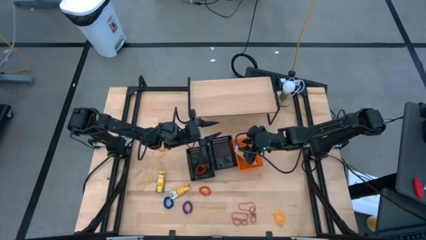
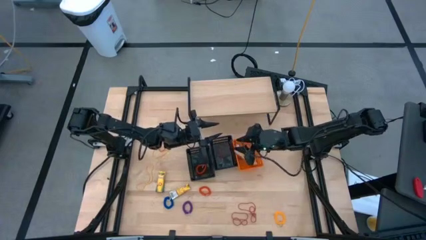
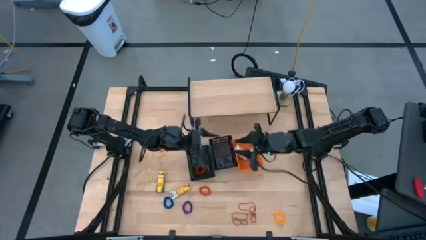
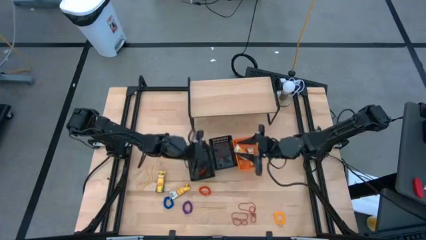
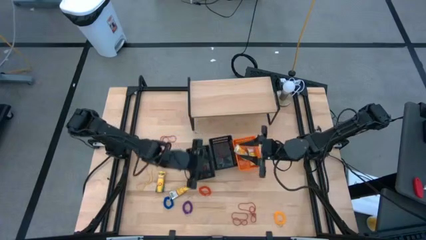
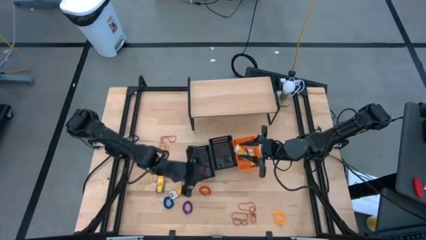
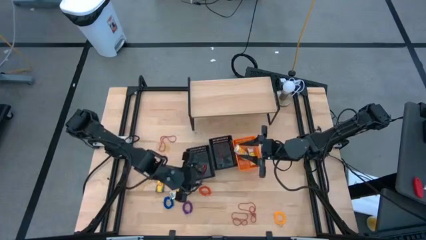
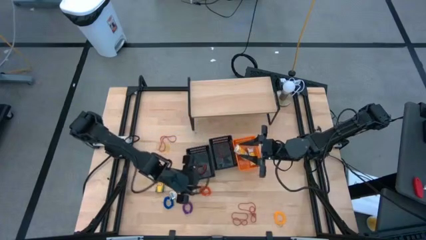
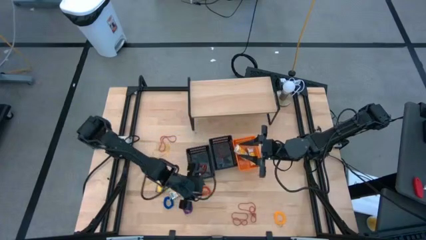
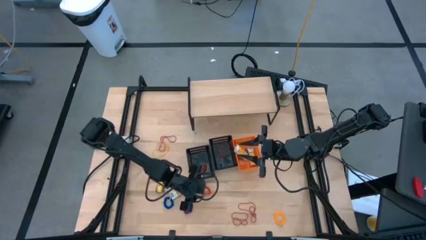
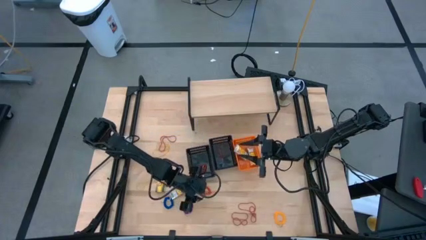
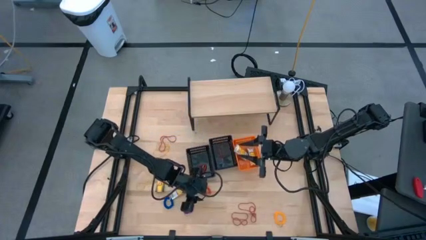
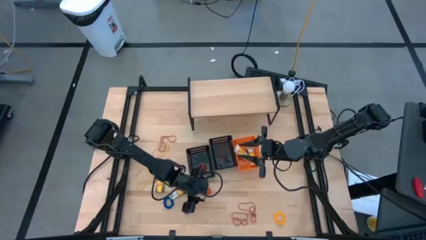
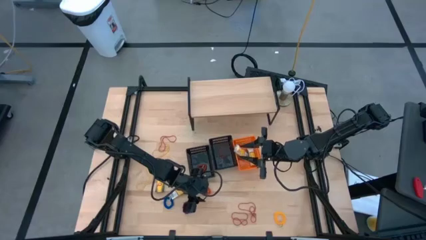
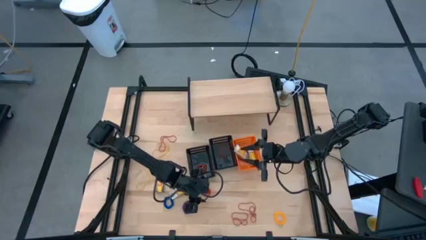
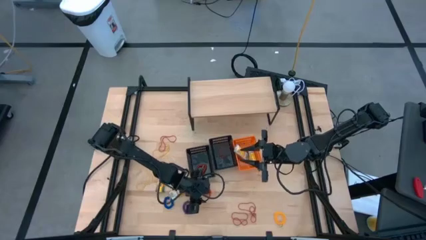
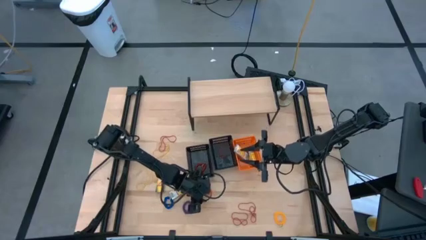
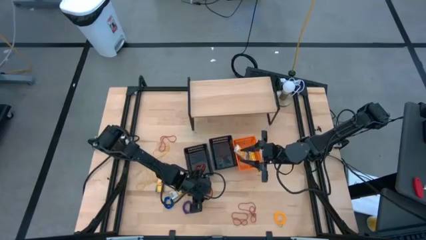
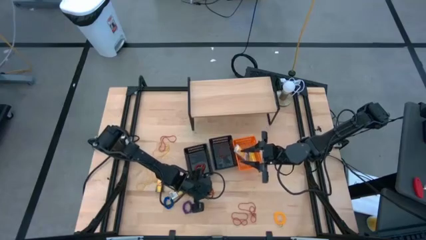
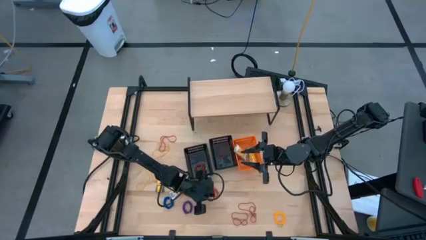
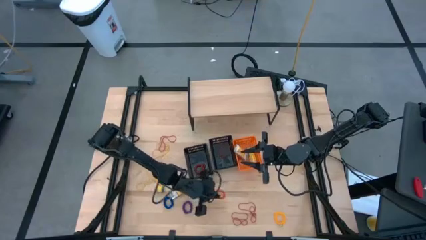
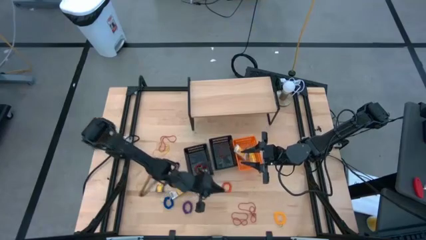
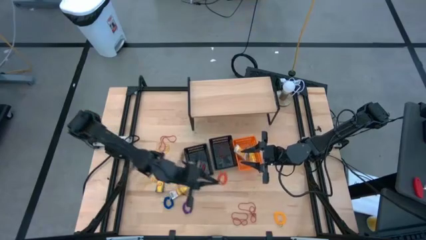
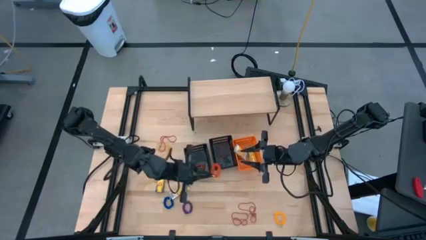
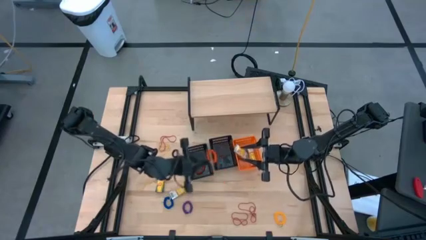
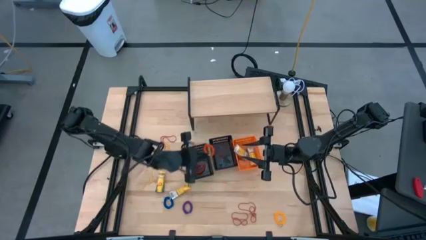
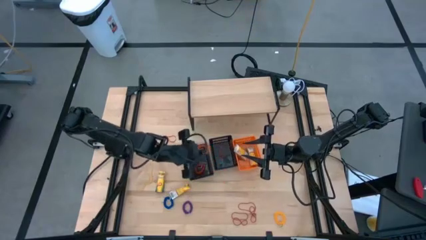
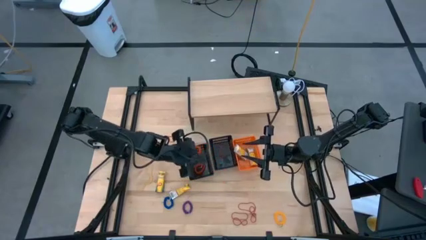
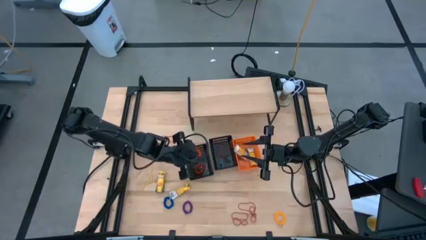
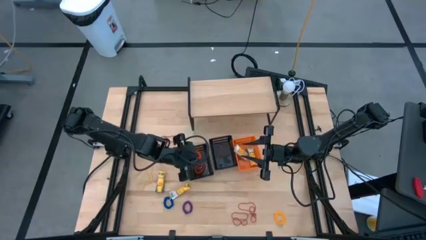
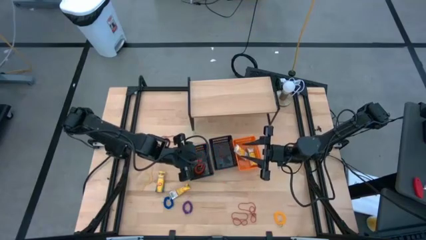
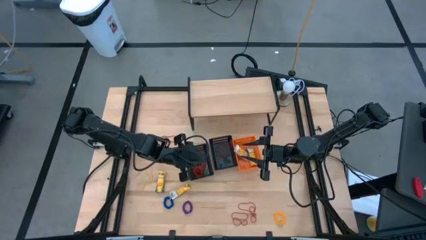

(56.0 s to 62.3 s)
Task: Pick & Place Office Desk Supplies
Put the orange spiral keychain into the left black bin

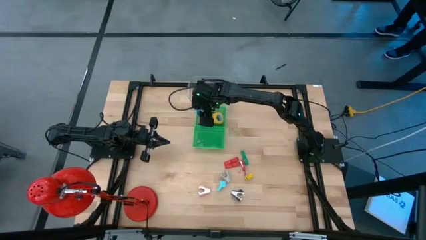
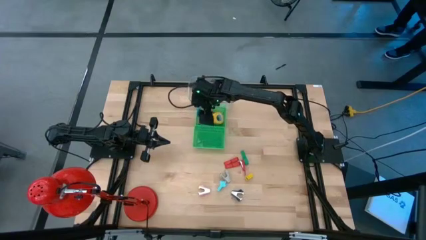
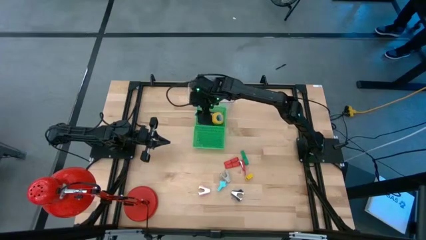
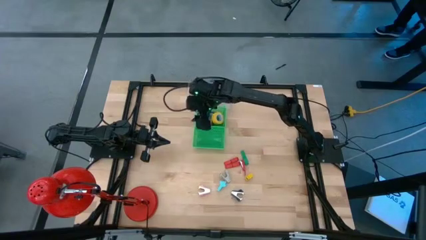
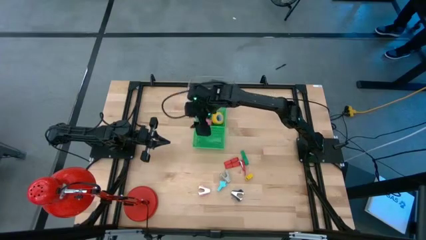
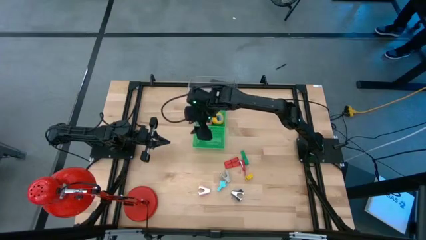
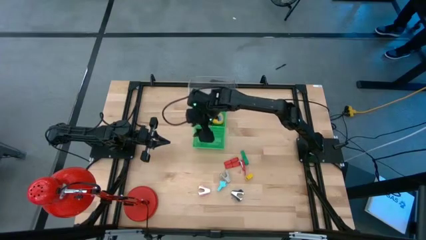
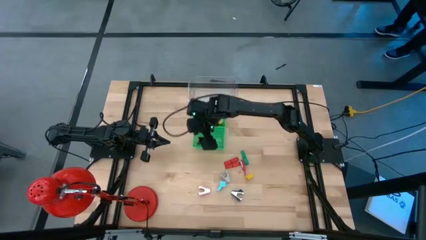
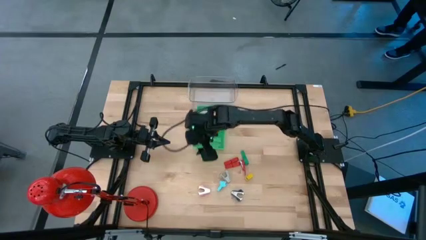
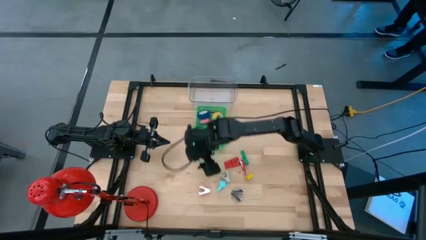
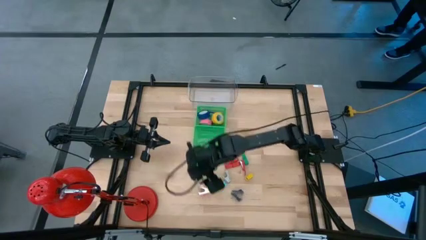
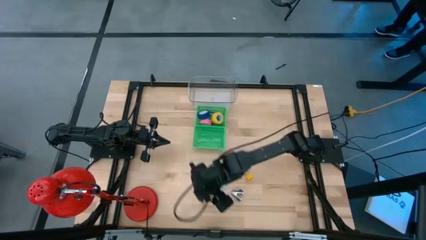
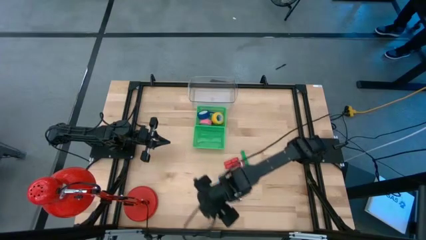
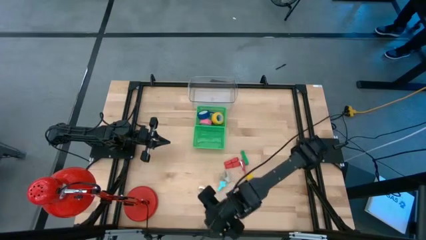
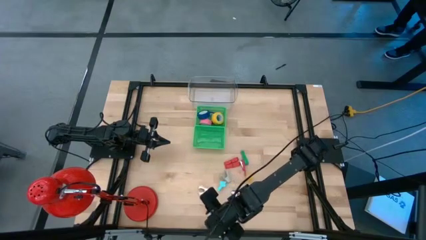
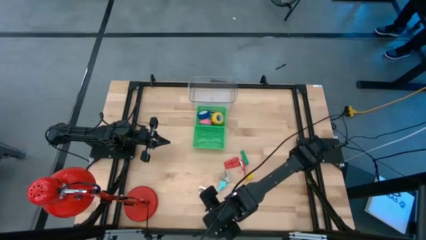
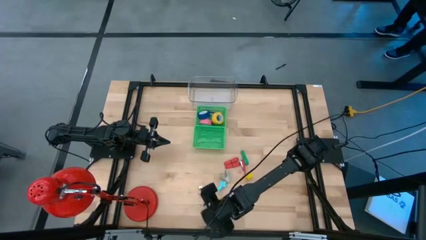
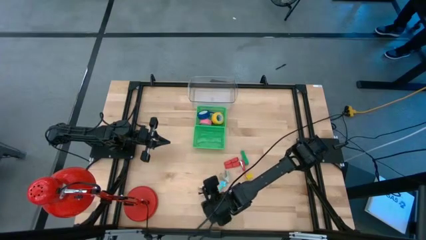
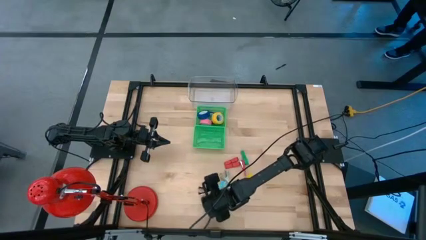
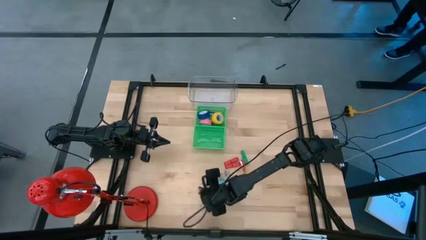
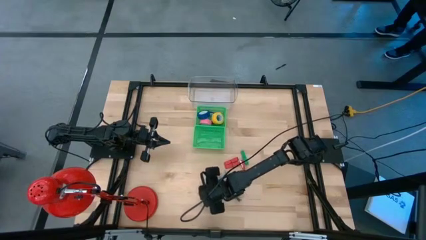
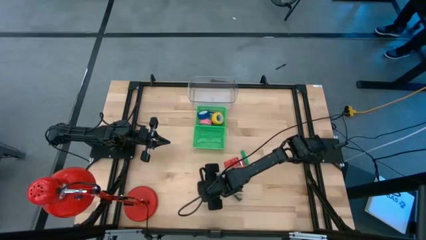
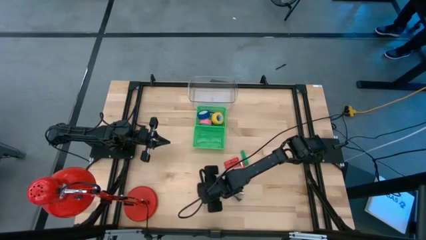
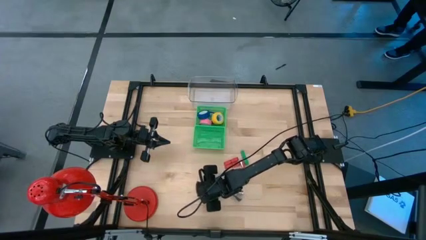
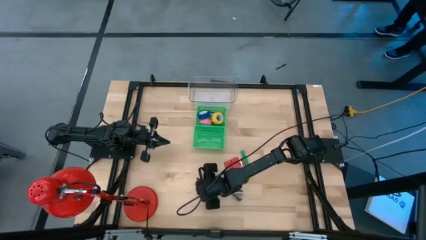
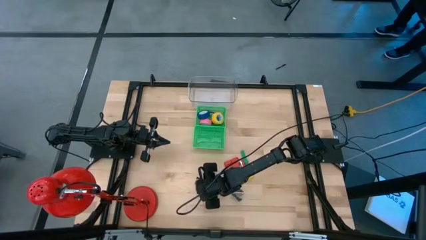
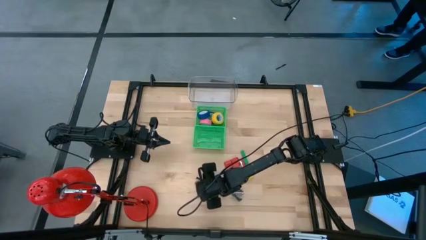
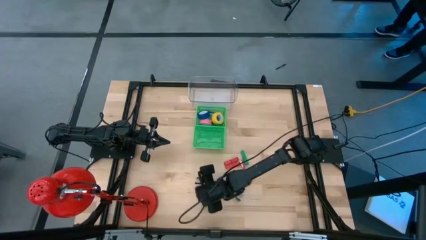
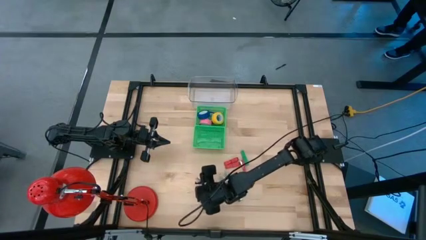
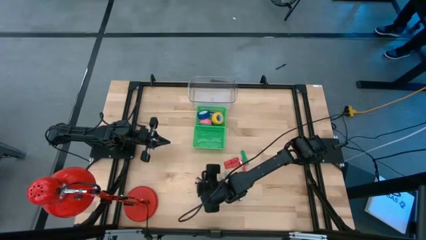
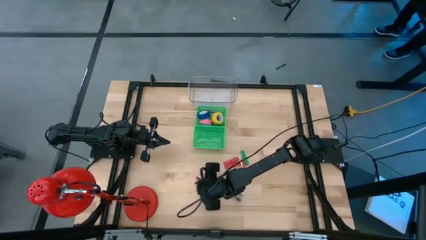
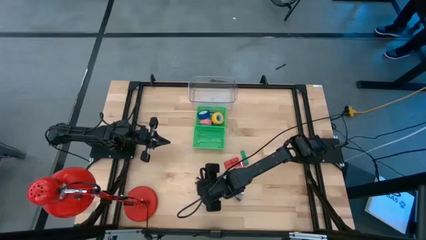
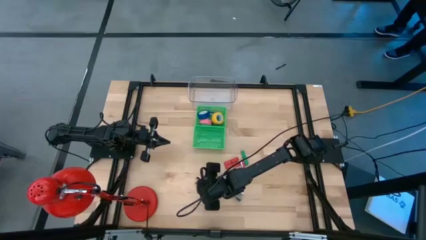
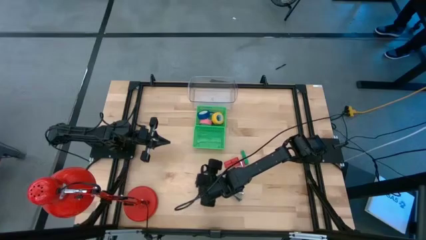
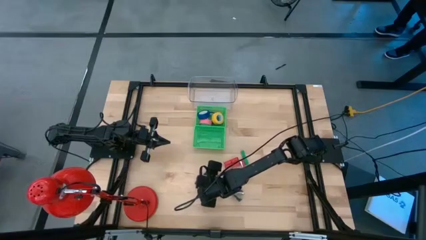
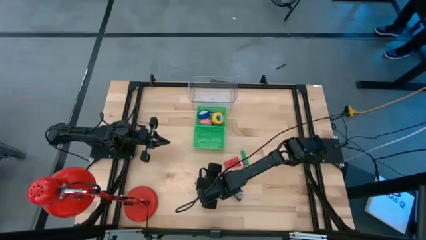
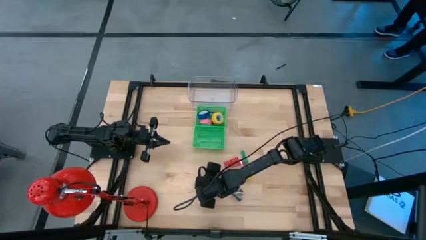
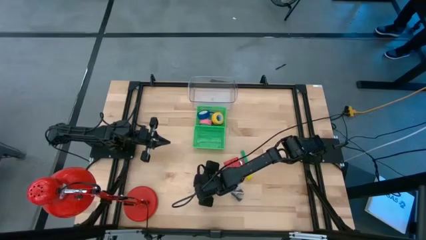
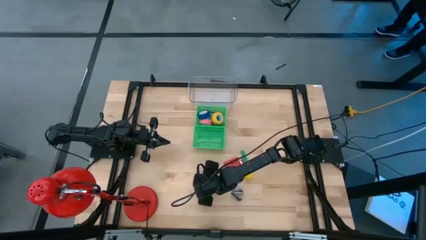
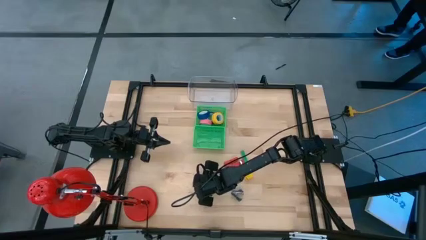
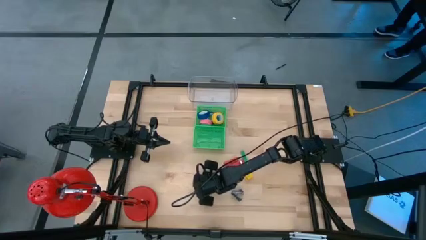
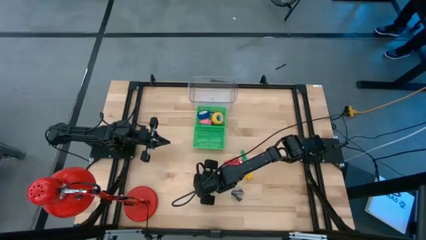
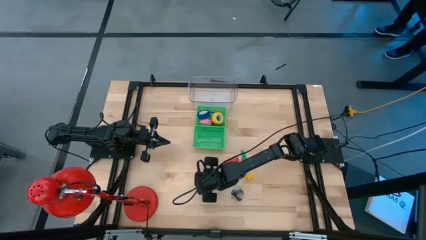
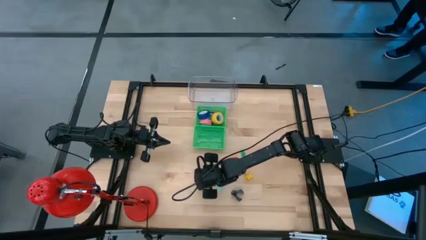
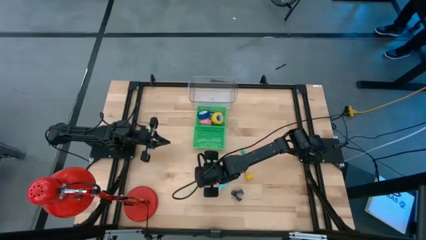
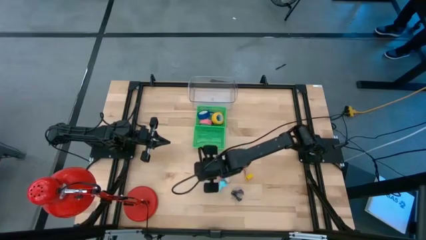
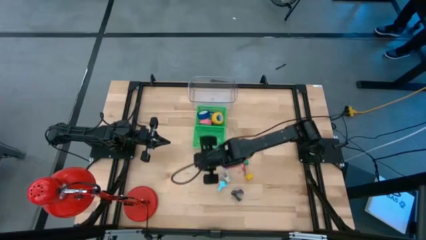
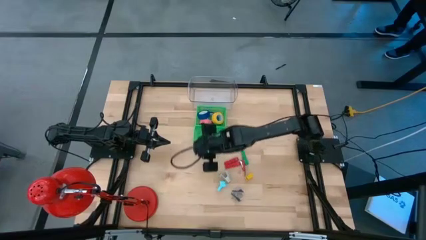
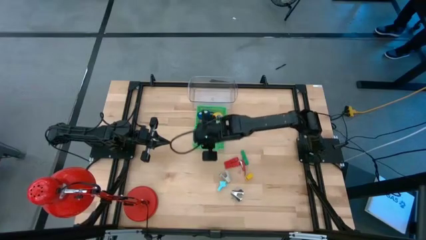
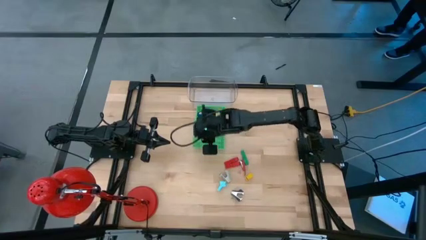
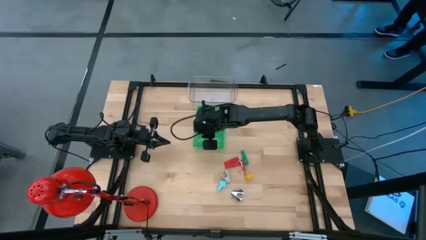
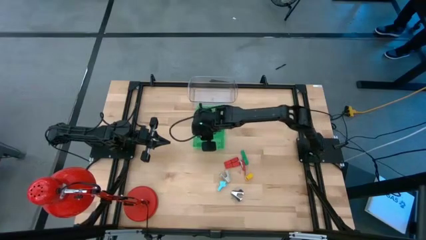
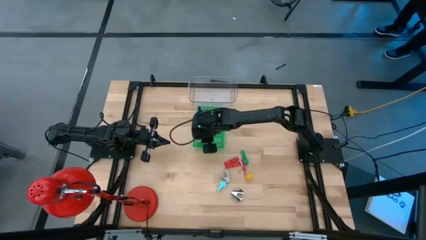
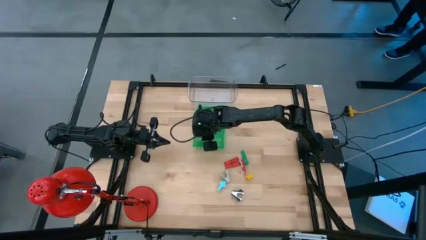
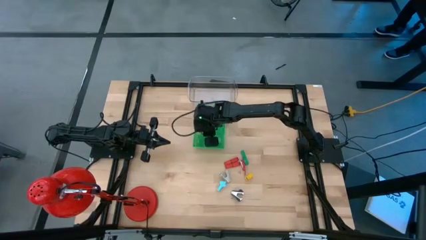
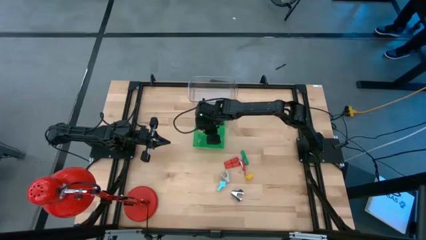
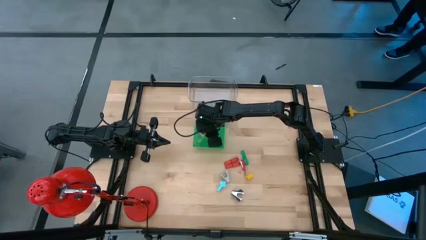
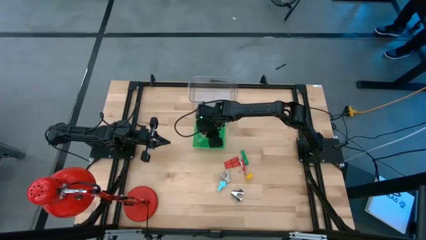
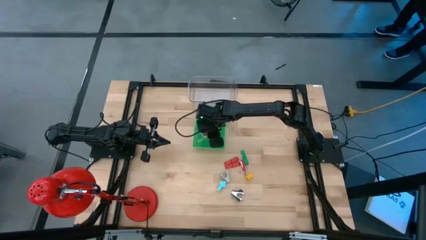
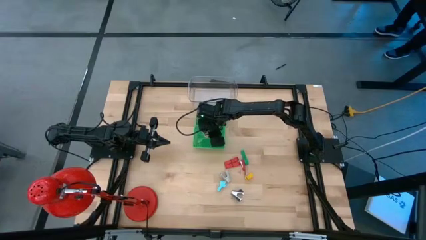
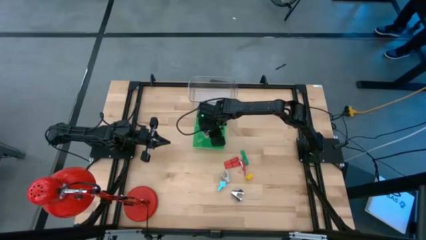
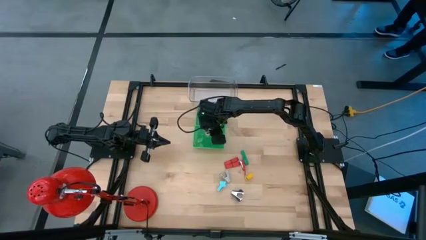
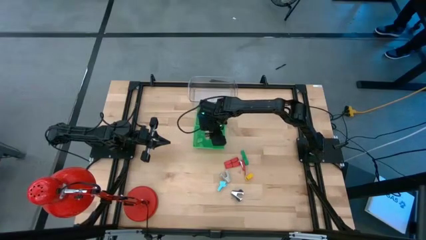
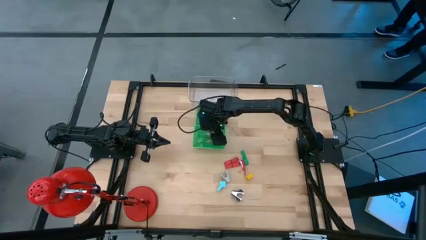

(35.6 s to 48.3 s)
Task: Pick and place Stapler, Stapler remover, tape
Put the pink staple remover into the bottom green bin
